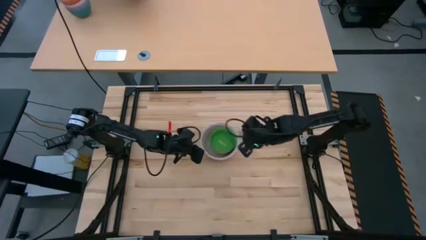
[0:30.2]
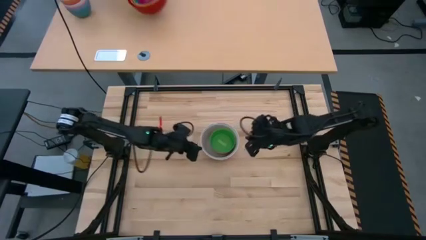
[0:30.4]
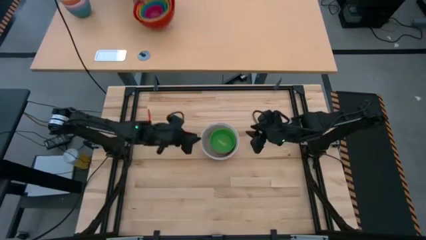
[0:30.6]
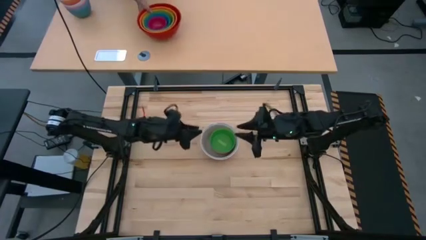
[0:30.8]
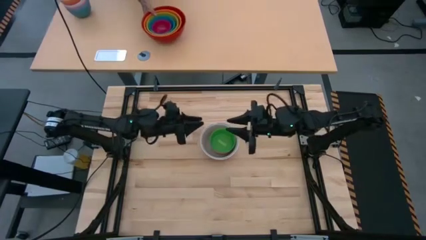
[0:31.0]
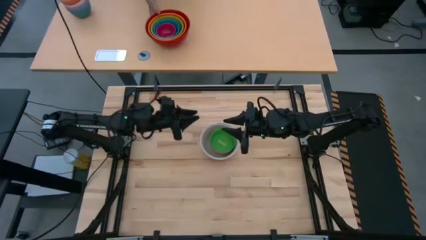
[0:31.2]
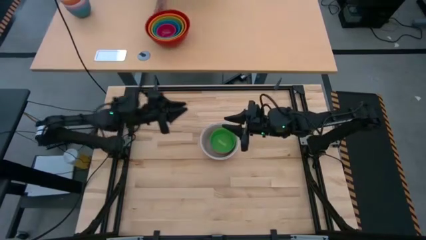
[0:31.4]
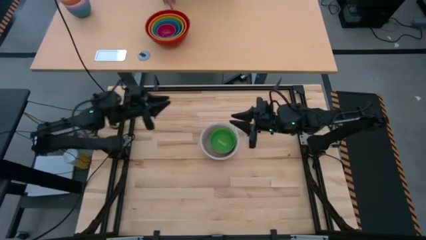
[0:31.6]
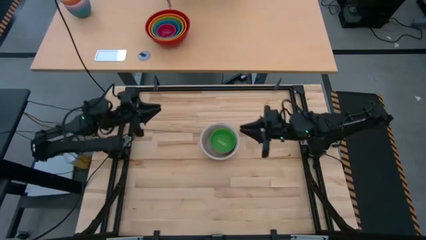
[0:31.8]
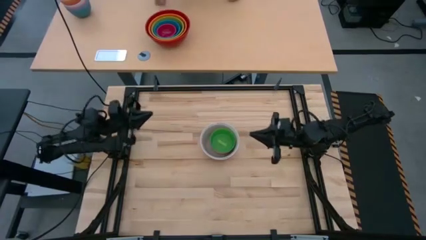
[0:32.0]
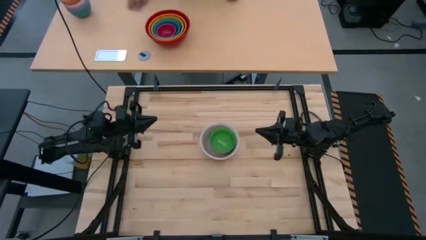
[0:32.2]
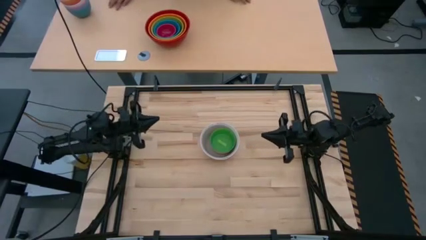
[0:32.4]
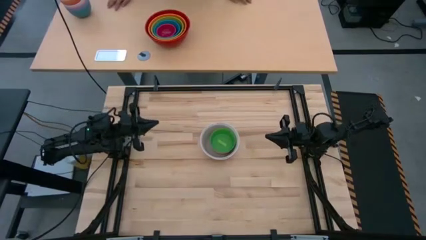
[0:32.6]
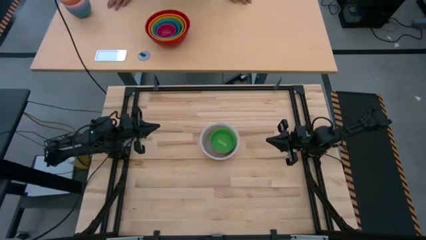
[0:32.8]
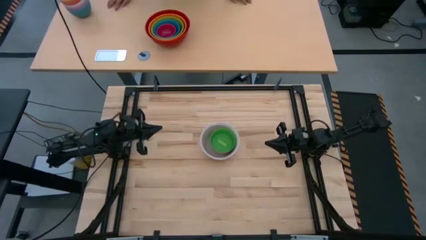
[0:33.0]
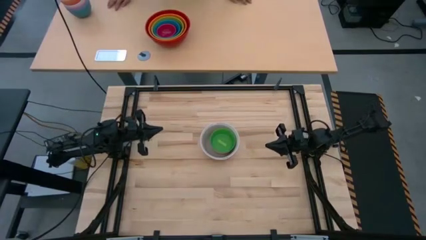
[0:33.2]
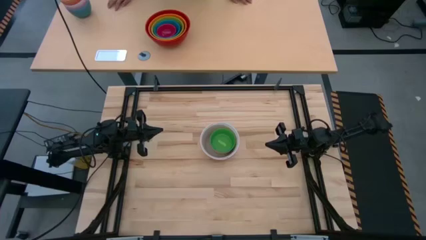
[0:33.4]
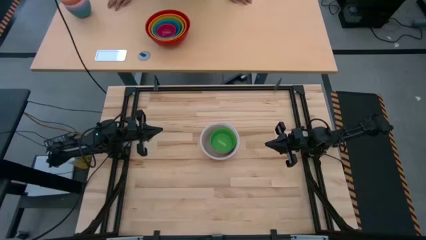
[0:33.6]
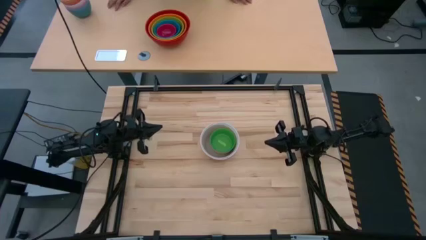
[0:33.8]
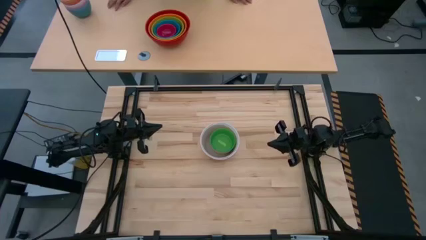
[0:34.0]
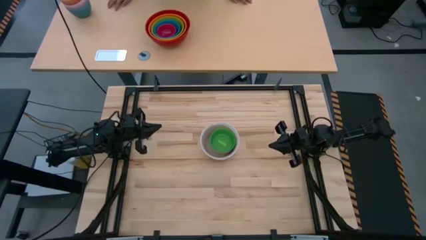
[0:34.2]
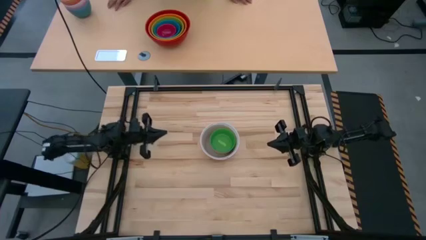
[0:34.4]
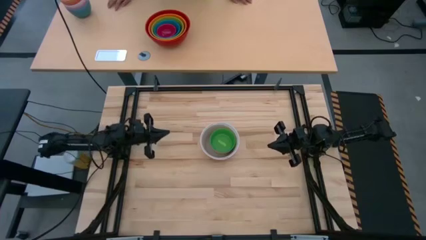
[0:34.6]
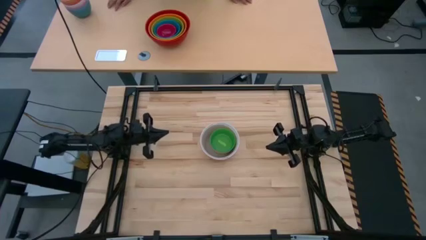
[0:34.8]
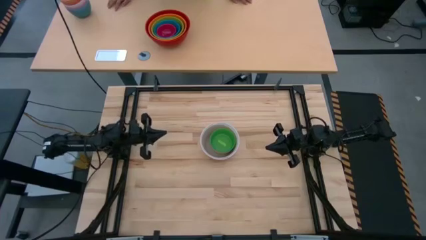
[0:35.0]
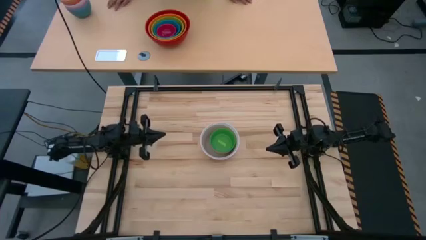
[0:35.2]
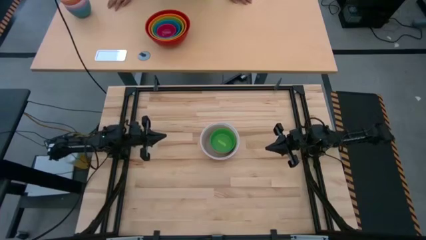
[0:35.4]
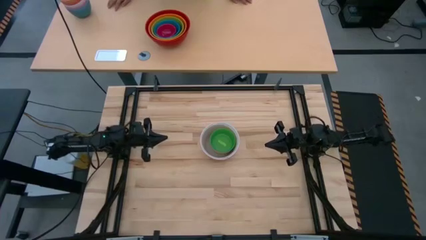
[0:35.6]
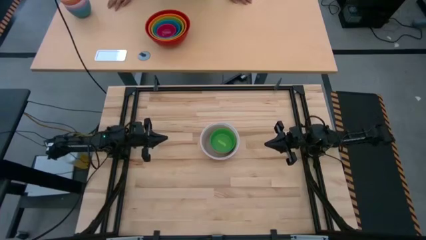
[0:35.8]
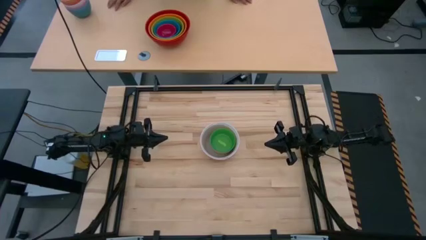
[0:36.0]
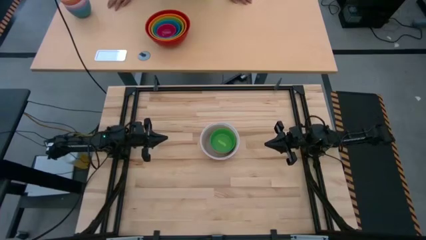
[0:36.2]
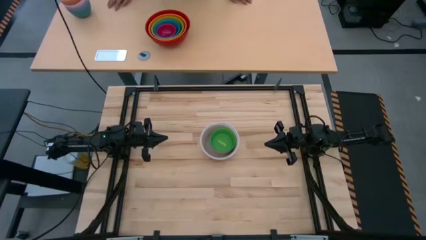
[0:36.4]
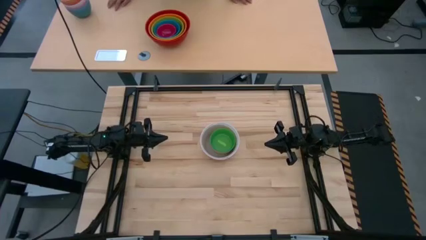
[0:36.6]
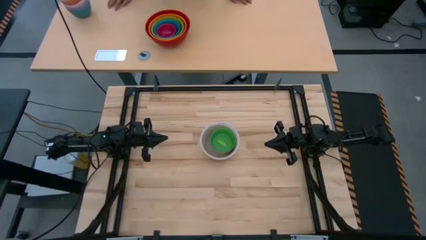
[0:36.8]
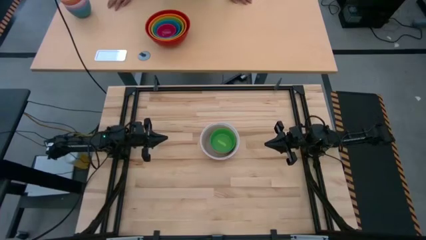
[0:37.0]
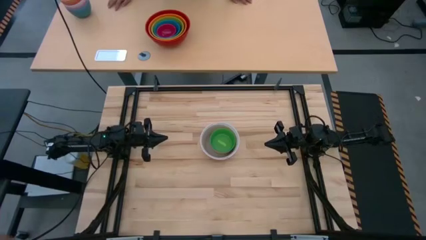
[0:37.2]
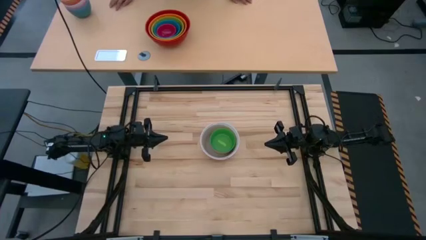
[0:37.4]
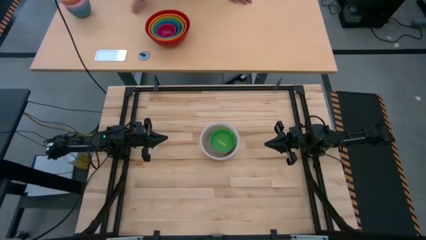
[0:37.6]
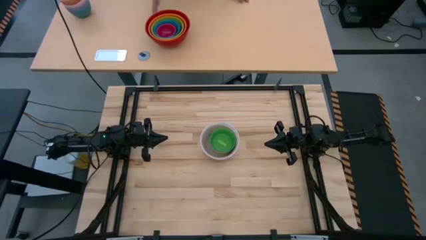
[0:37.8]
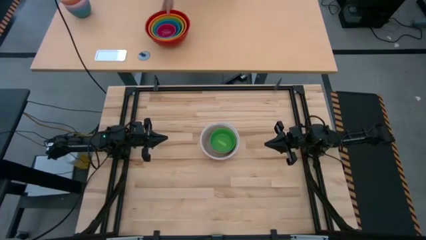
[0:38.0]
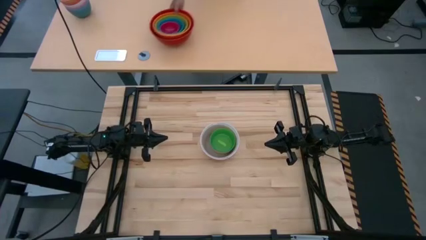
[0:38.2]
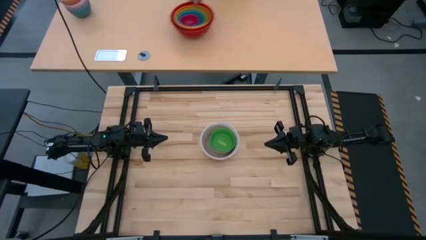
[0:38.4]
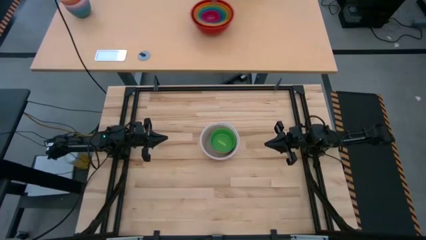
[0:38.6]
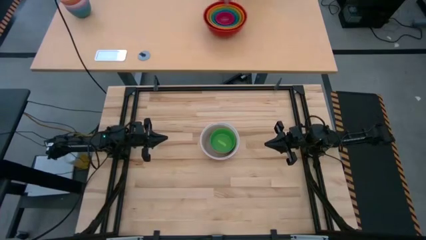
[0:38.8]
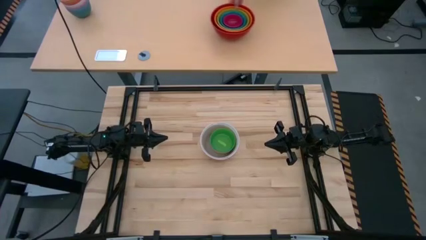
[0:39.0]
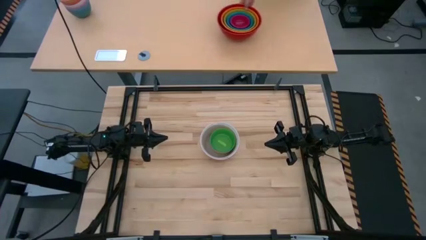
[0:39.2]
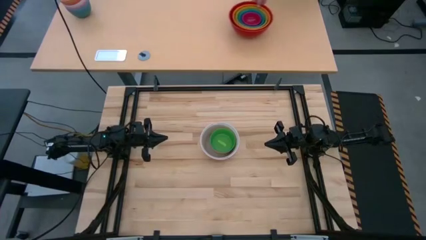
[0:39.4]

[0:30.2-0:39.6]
Return to Home Position
